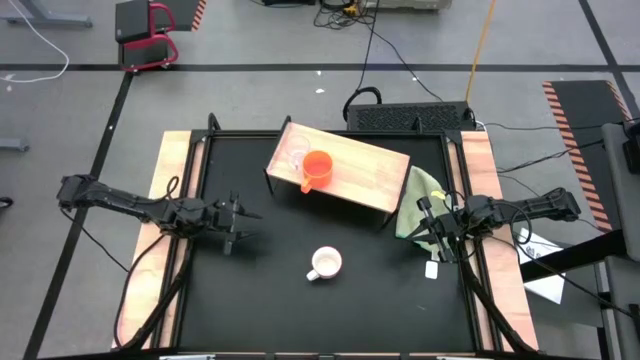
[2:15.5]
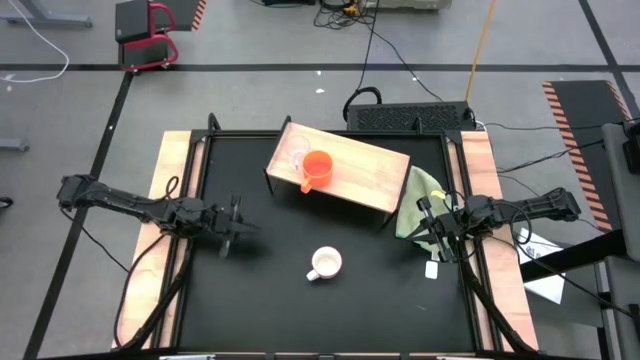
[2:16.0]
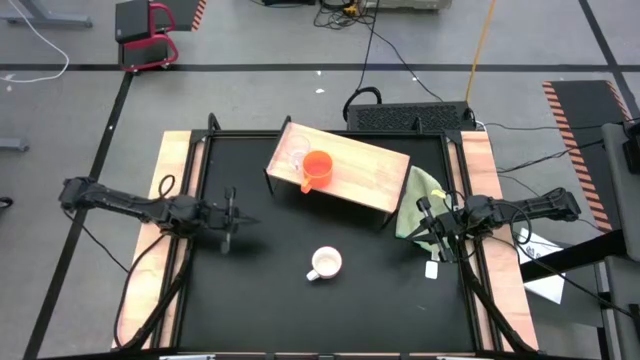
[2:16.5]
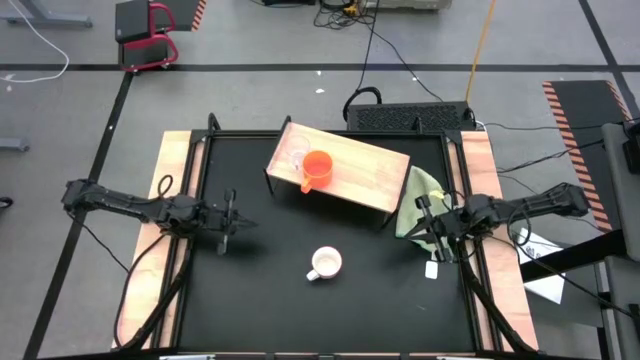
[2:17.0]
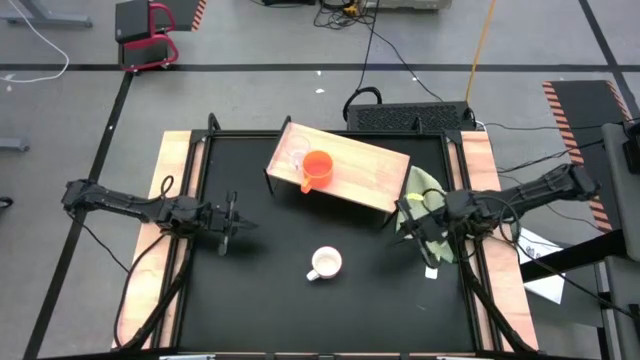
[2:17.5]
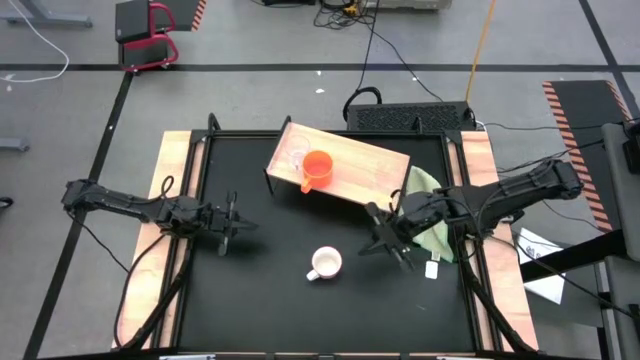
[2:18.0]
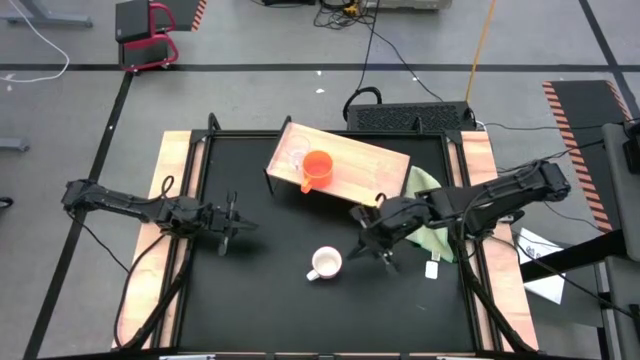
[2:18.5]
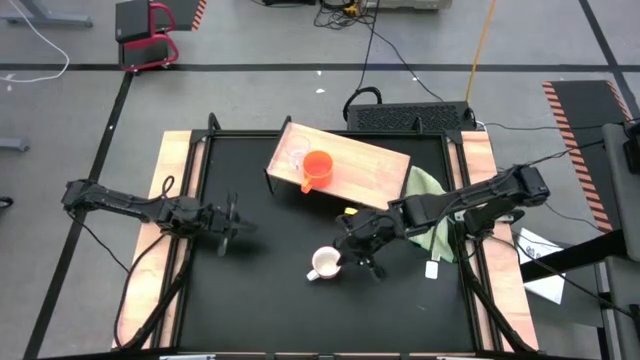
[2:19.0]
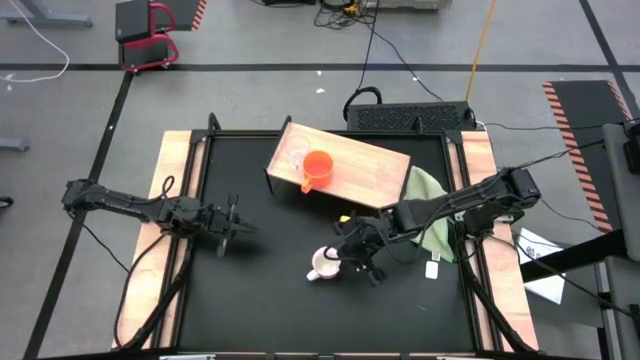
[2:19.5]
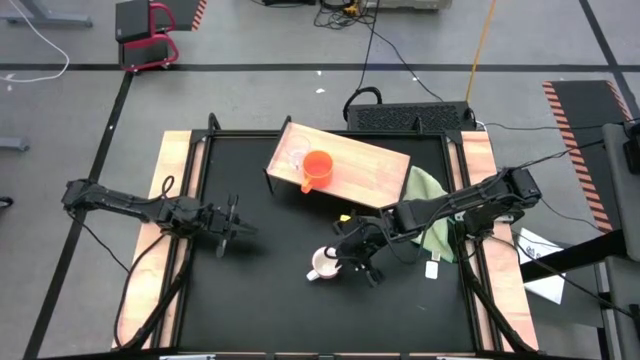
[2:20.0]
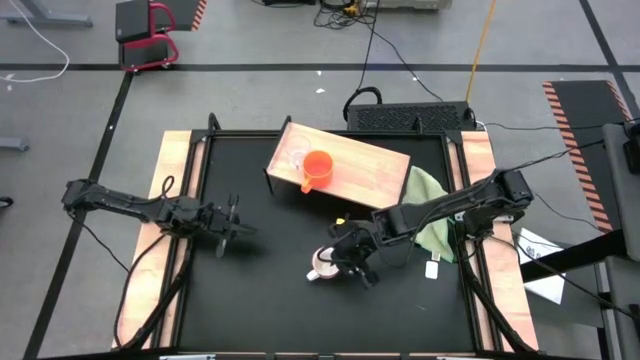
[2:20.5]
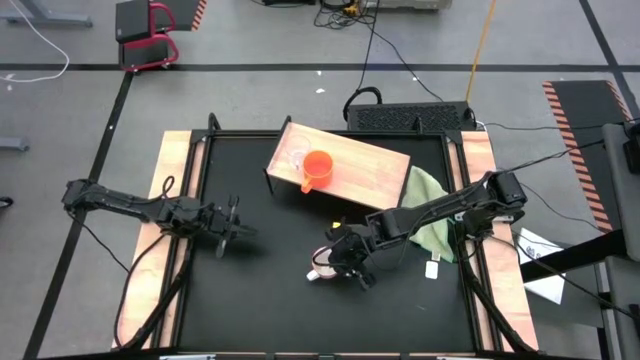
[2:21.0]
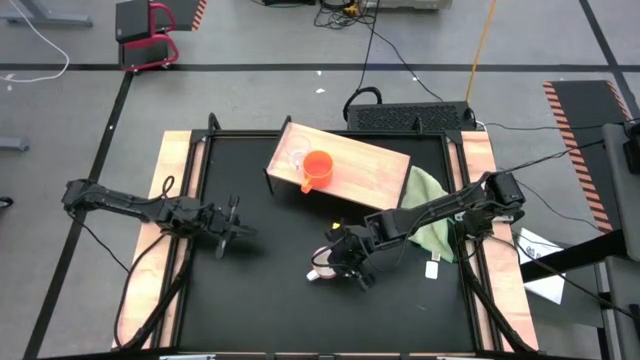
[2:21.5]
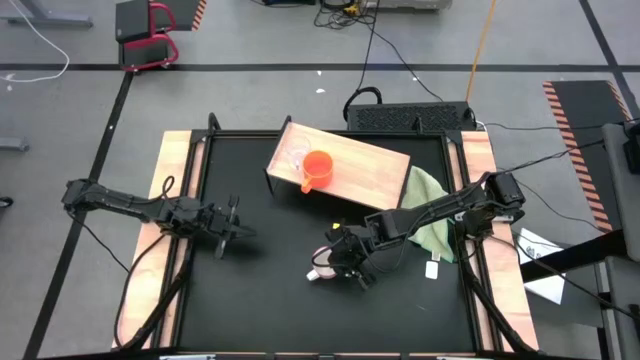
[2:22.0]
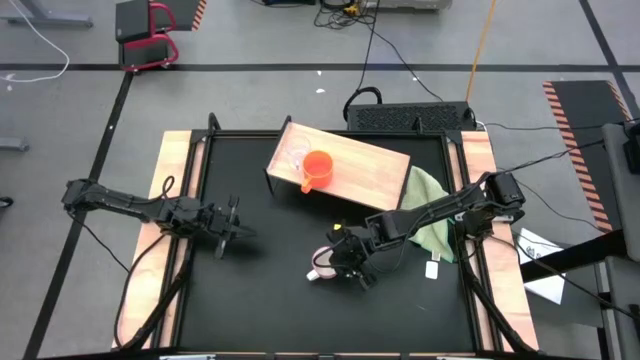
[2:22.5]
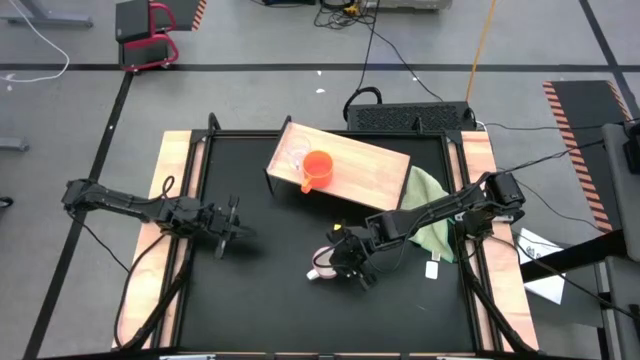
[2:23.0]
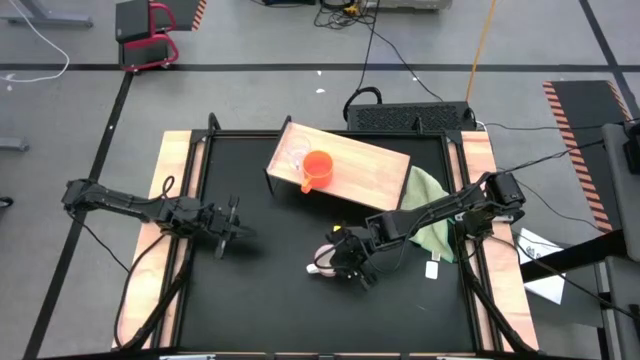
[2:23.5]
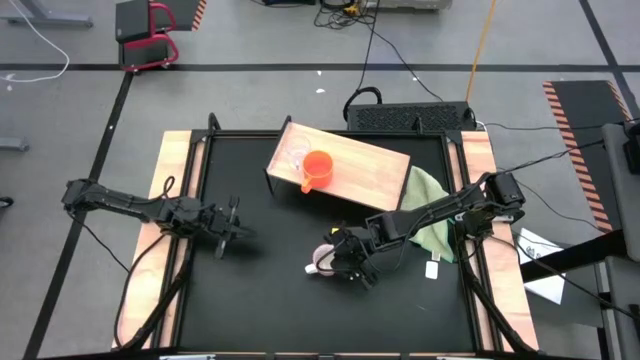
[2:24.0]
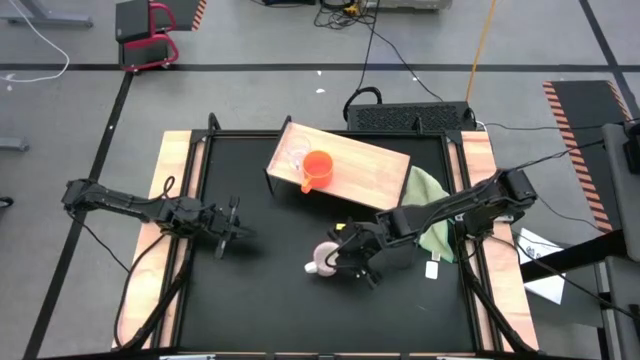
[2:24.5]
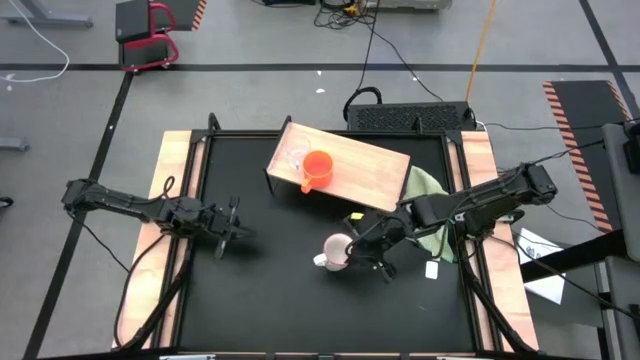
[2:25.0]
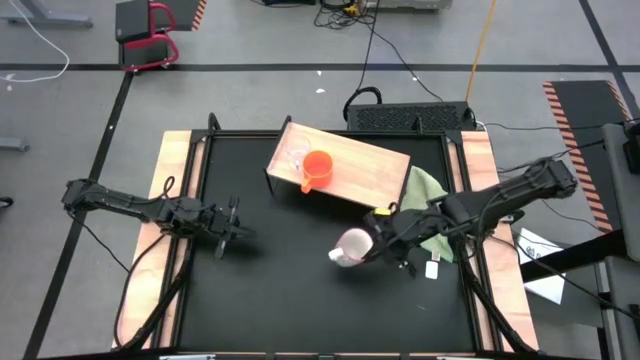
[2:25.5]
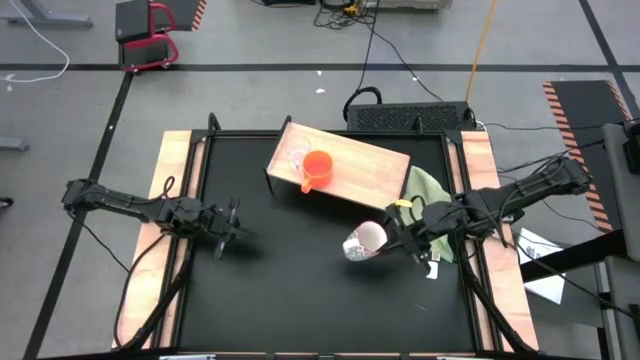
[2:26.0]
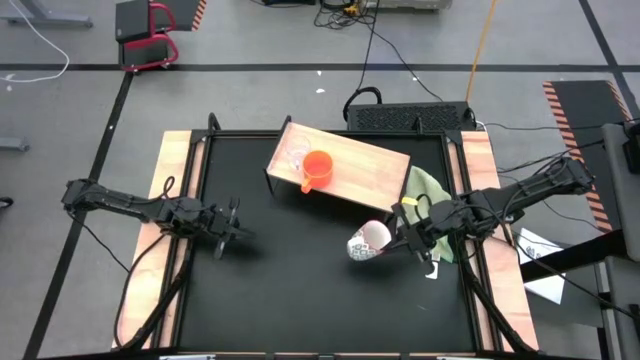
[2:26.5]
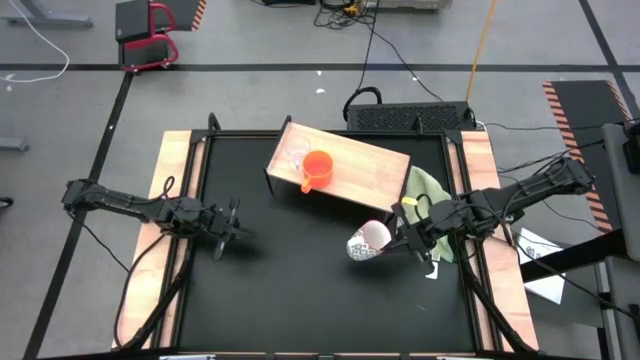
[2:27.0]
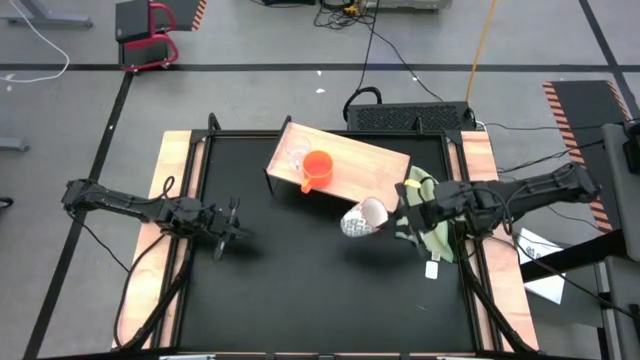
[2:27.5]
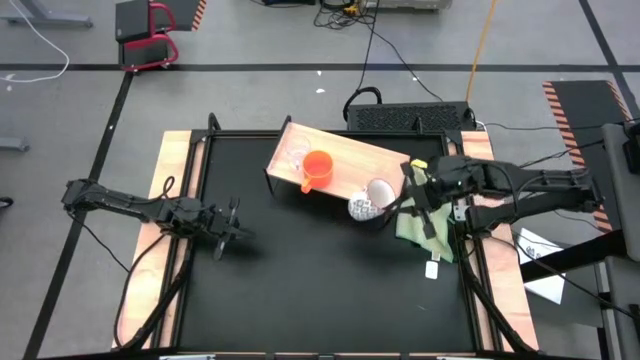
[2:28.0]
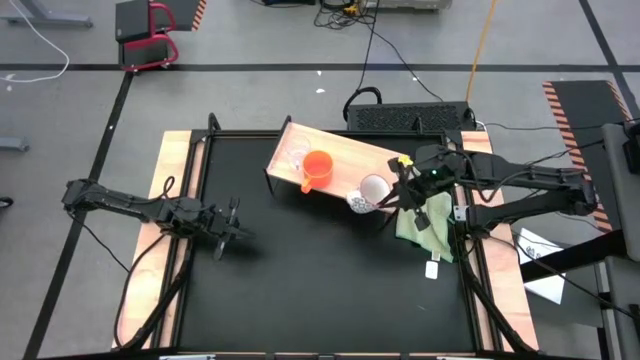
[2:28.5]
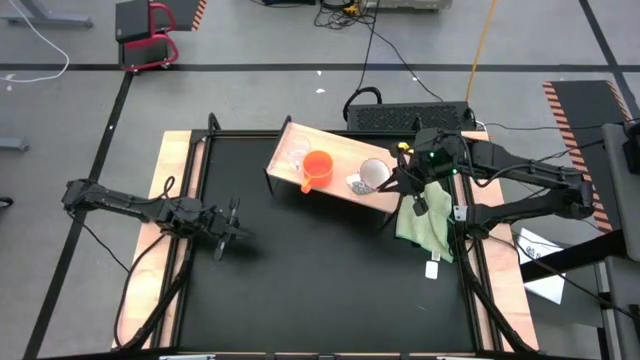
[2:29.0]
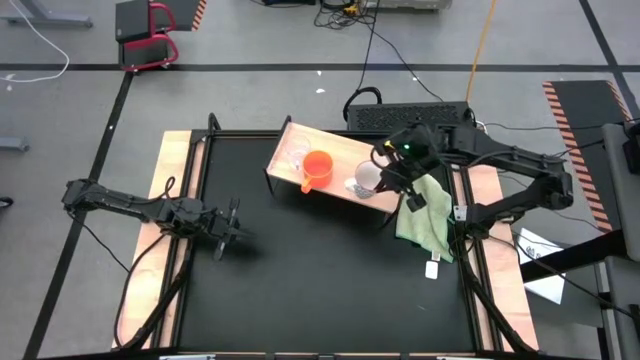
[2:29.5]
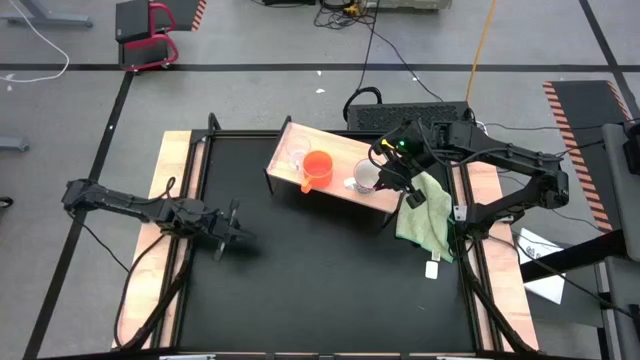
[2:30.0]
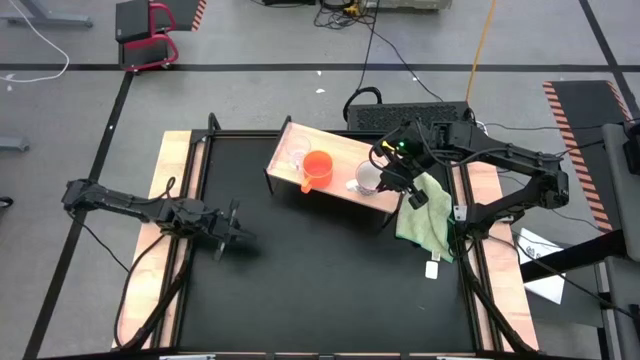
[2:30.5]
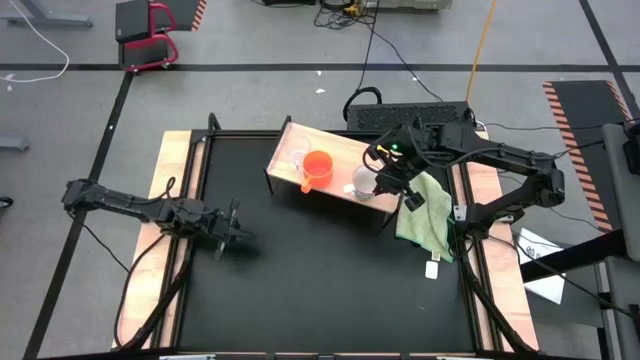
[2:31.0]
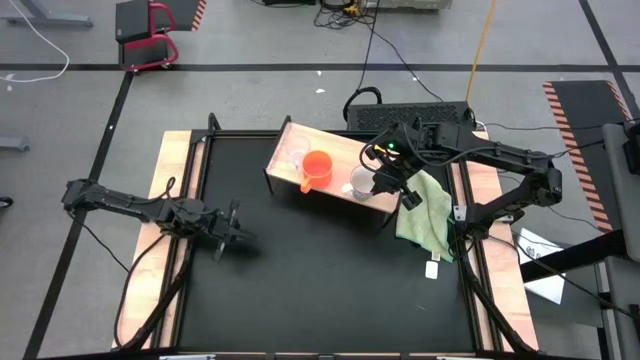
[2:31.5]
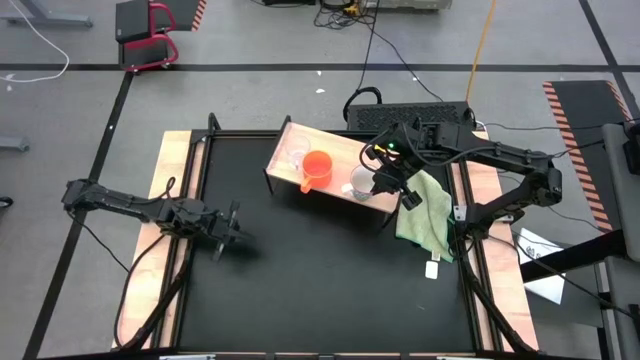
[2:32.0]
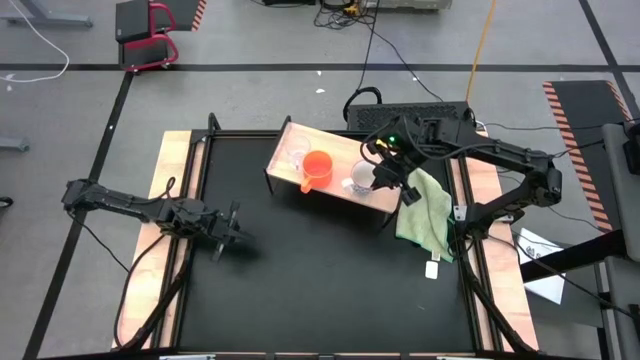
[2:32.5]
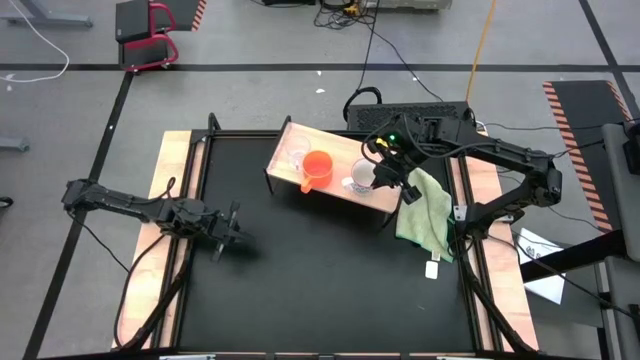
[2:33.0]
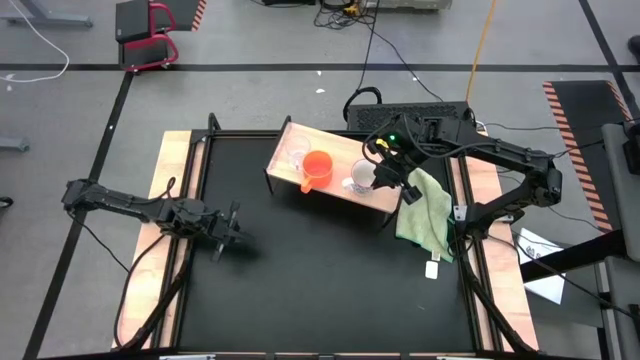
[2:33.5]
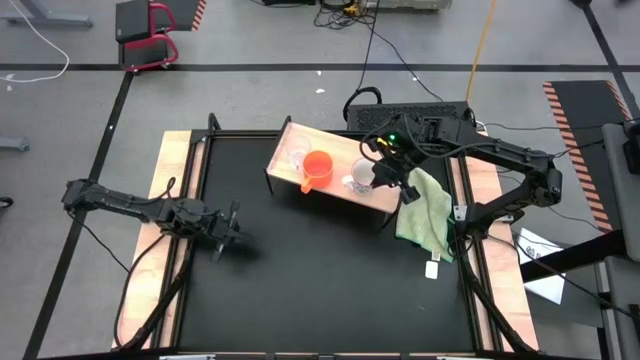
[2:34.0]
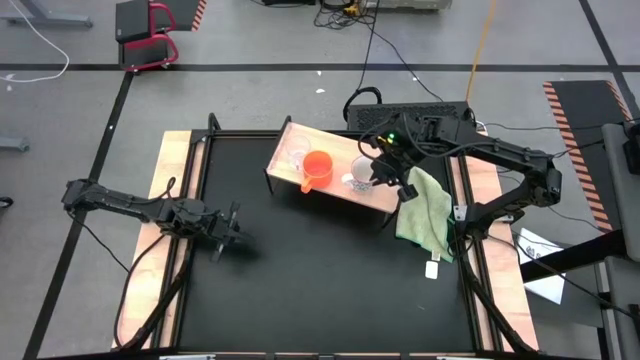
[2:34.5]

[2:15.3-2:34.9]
Task: Stack small to large cups/mugs on shelf
Put the gray patterned mug on the shelf
